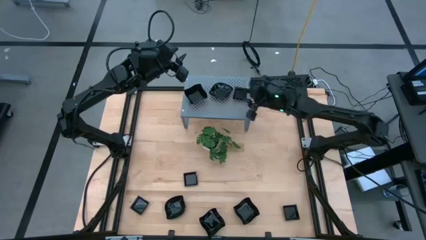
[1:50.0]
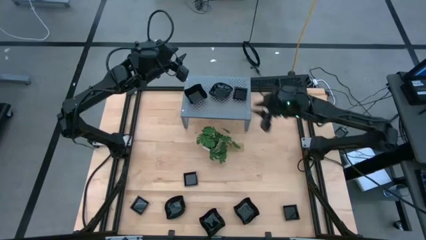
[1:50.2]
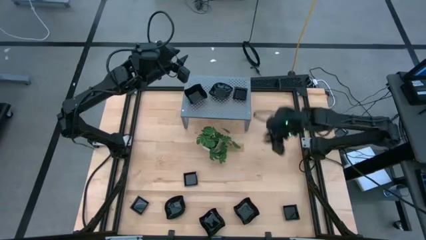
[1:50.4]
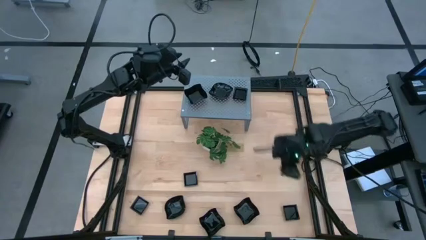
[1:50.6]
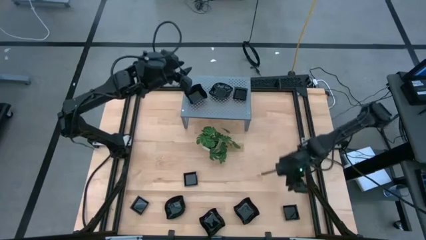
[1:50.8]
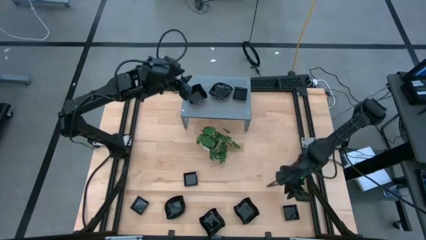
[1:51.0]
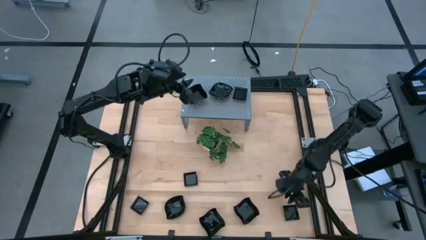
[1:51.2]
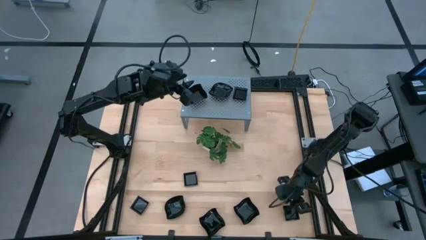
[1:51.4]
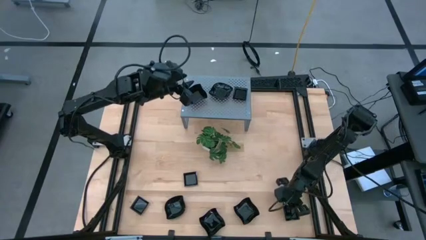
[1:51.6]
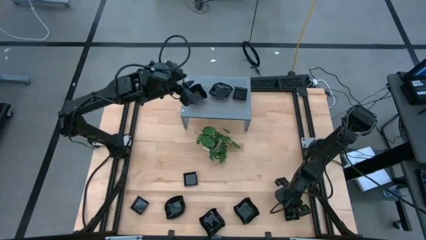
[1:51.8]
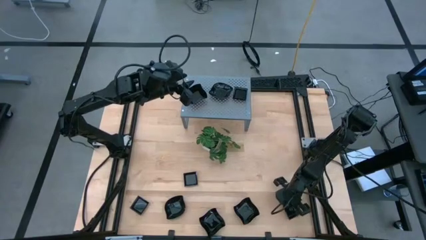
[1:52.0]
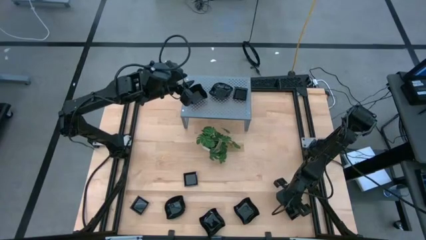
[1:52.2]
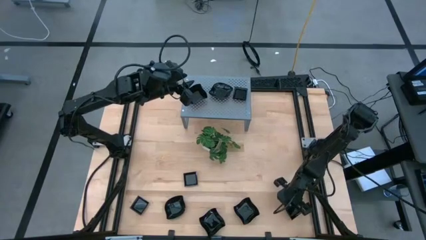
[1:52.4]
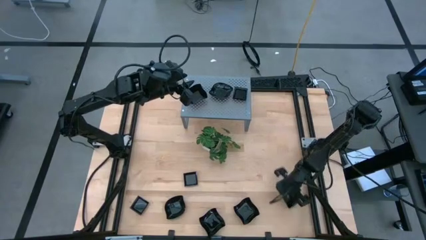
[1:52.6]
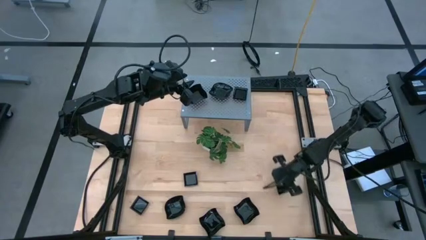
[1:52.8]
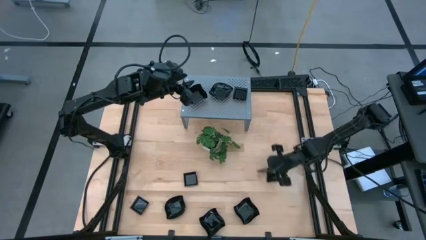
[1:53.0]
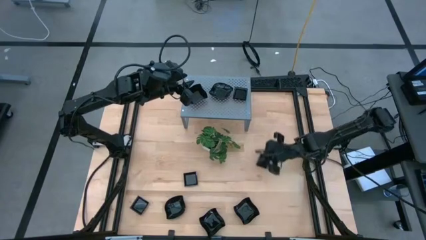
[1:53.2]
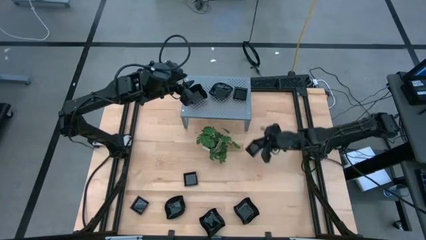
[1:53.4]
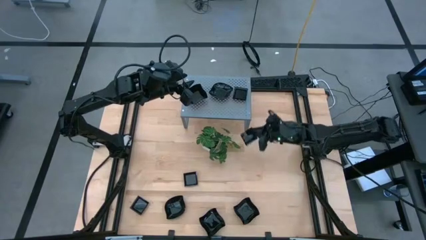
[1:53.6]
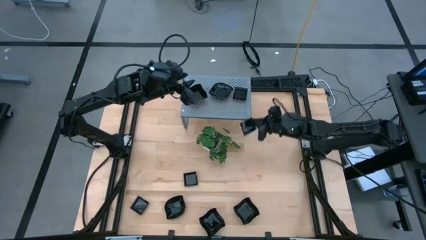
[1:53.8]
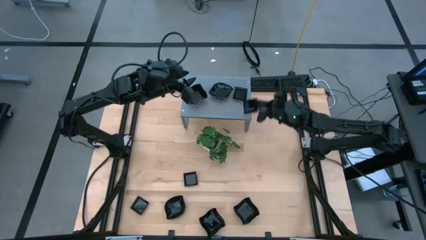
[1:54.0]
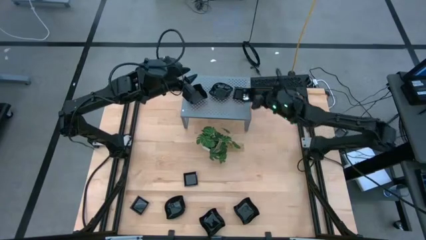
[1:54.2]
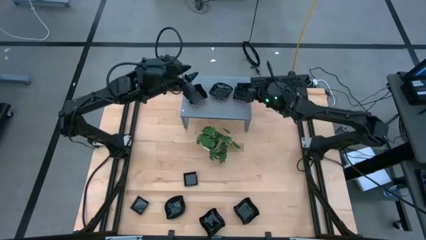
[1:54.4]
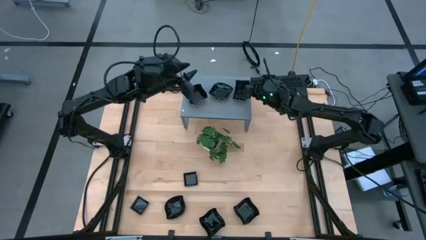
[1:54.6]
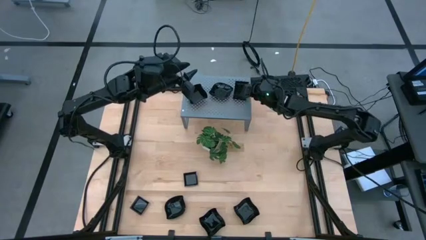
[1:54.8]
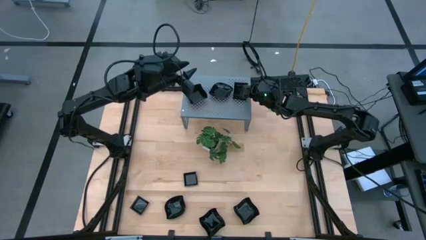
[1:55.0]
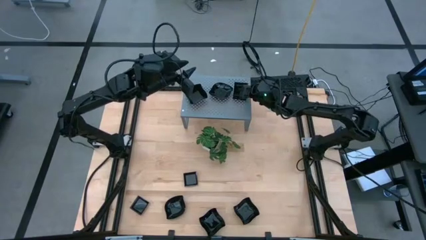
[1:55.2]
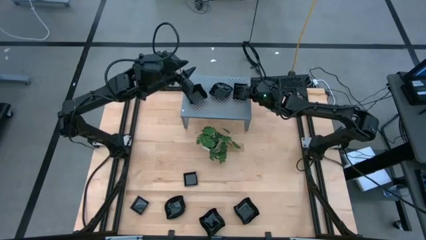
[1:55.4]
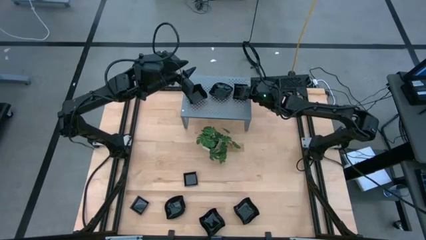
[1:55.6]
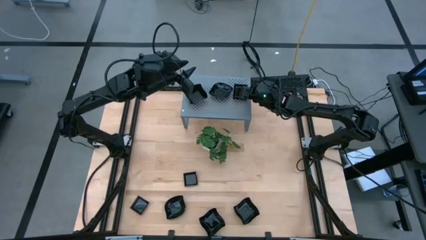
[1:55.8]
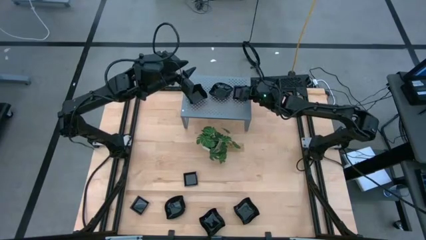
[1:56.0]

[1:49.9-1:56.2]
Task: Pick & Place Mini shaped plates
Stack the square plate on top of the stacked square plates on the shelf

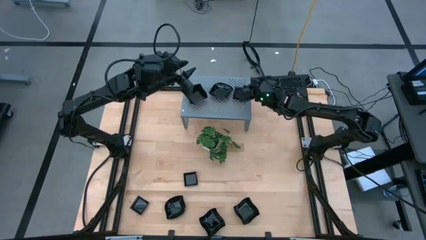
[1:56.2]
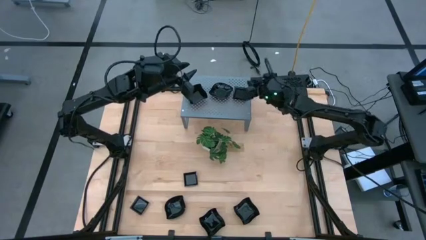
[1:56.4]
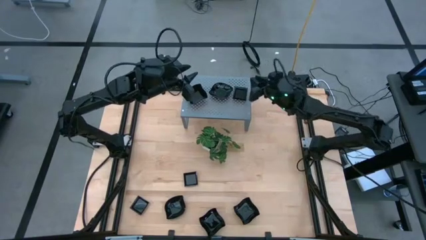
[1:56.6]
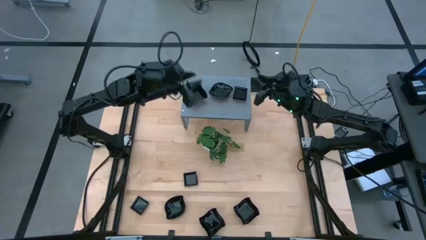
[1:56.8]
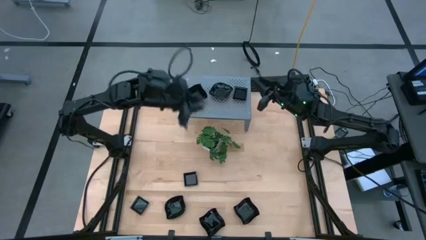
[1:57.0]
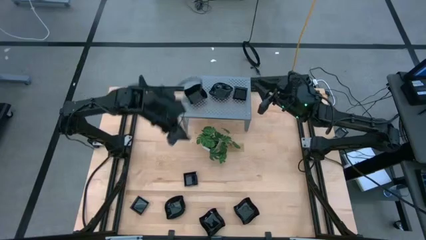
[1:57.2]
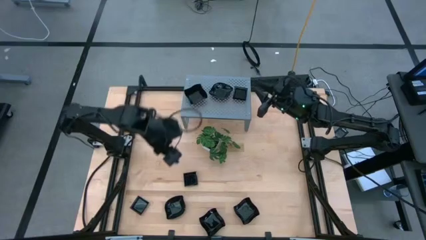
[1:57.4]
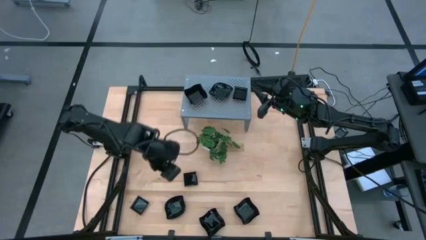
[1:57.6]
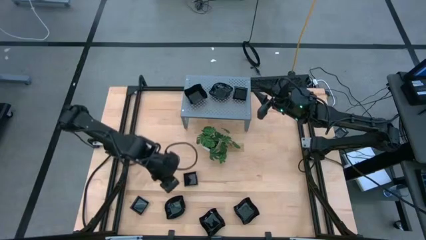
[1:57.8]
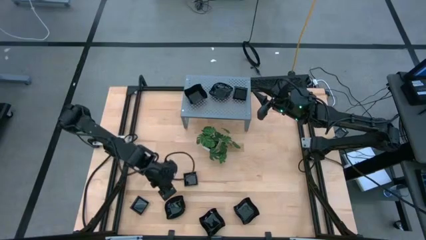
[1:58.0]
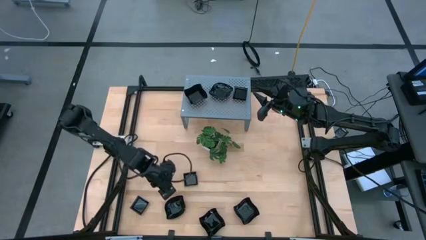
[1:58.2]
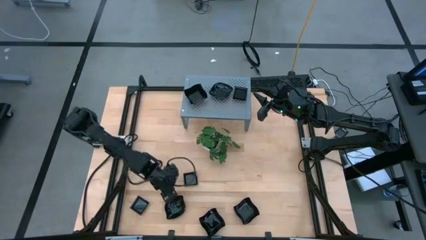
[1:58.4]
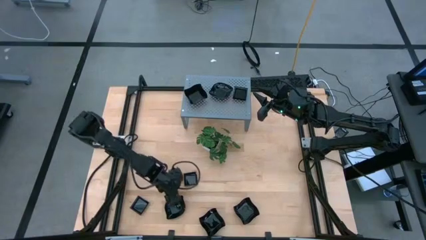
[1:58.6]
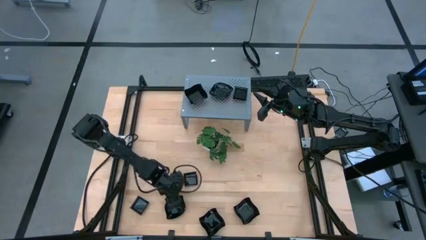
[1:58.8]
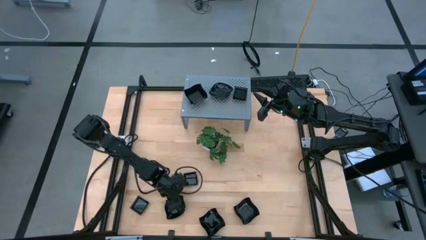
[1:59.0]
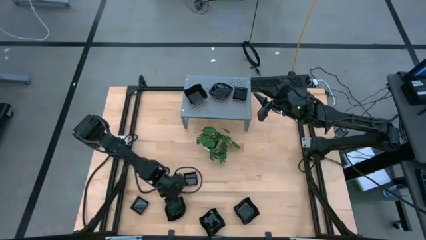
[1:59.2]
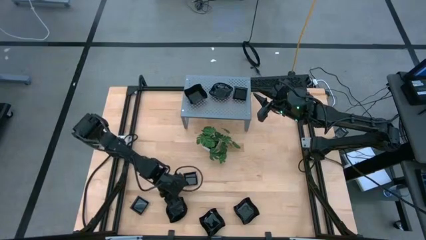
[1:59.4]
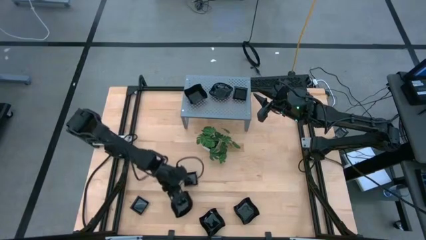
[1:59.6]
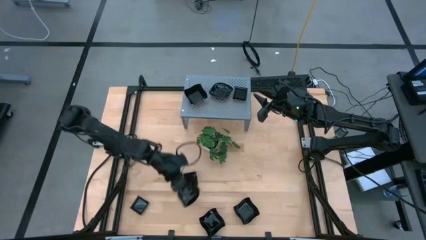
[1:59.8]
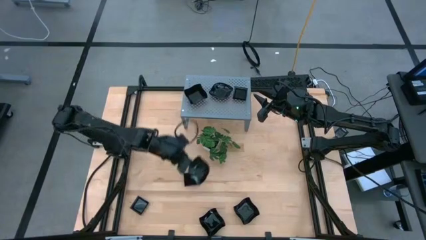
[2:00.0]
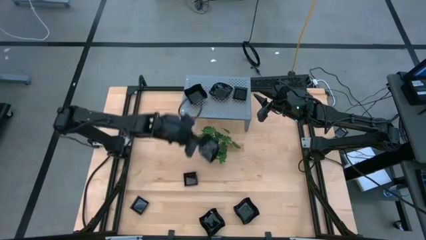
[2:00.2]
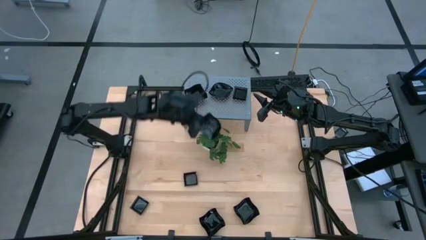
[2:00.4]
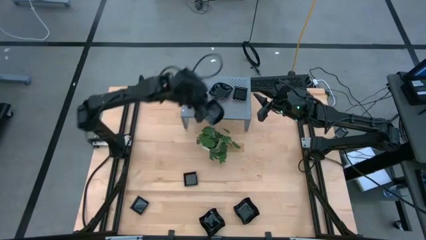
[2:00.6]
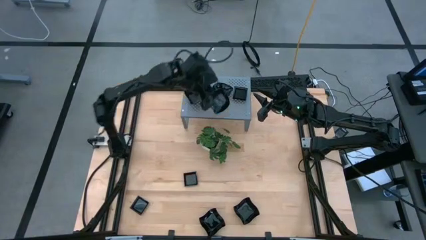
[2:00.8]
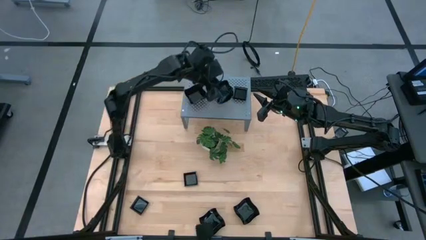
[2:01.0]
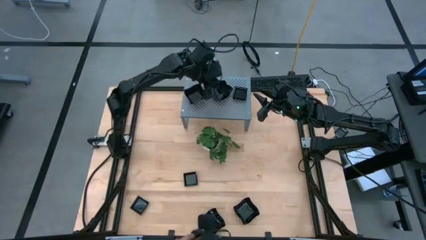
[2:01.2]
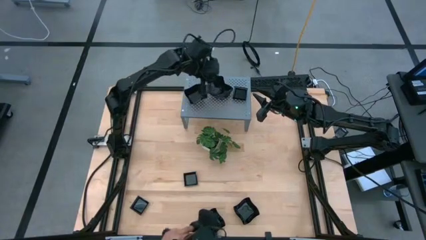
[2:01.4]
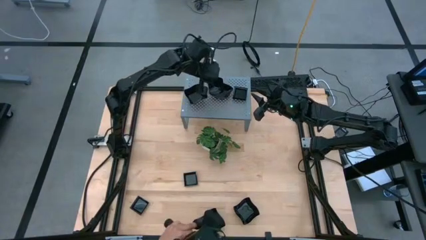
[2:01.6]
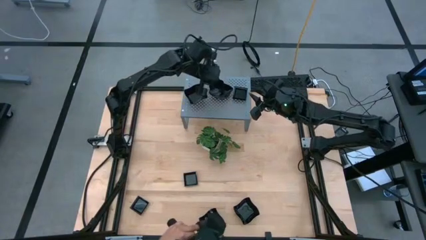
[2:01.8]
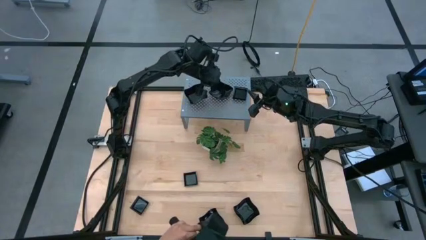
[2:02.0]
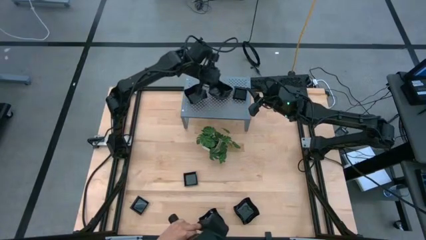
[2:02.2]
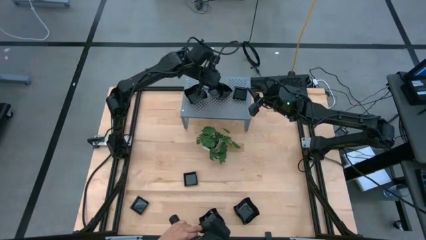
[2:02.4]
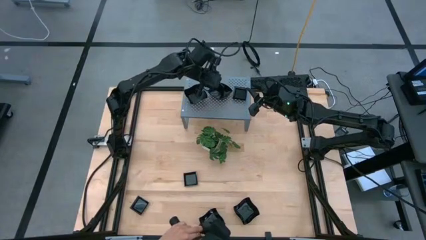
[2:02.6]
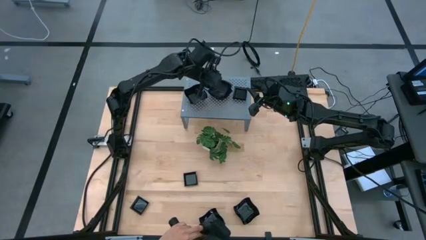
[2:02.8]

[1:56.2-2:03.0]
Stack the leaf-shaped plate on top of the stacked leaf-shaped plates on the shelf
